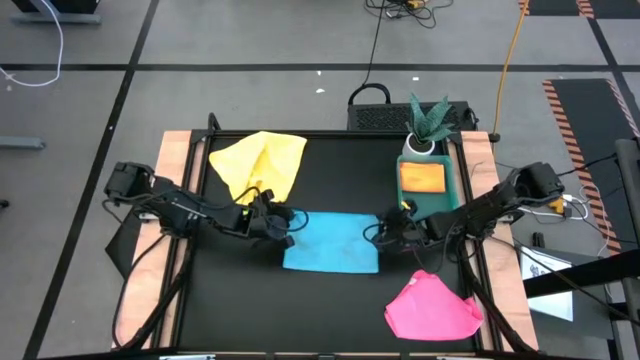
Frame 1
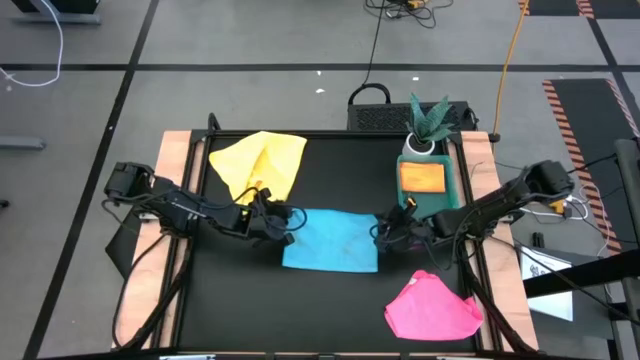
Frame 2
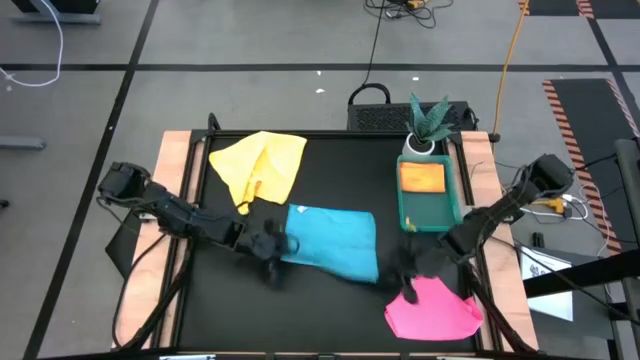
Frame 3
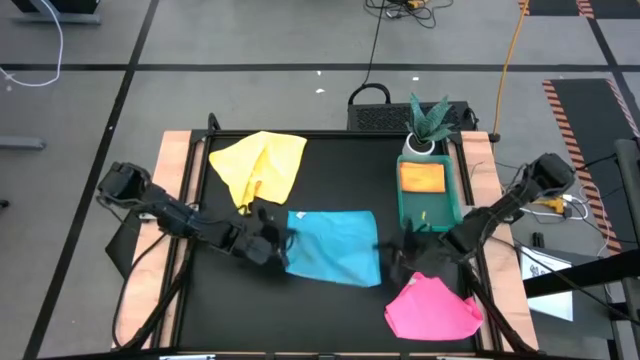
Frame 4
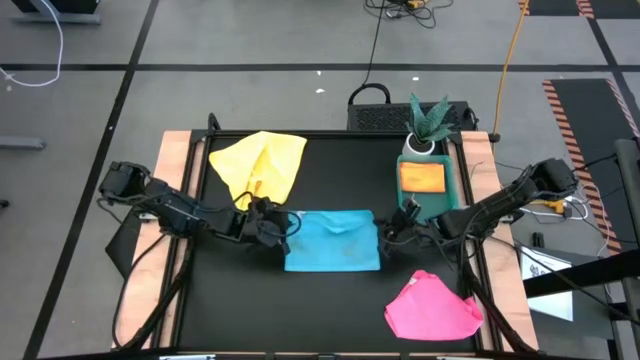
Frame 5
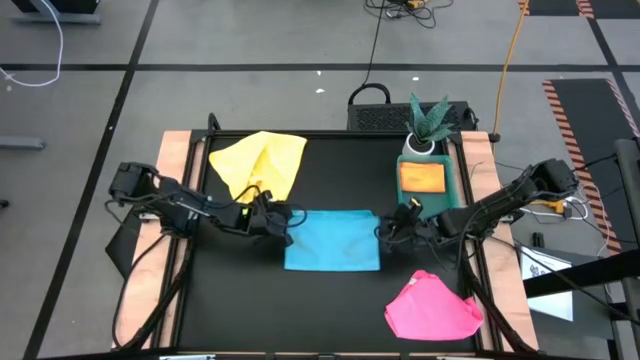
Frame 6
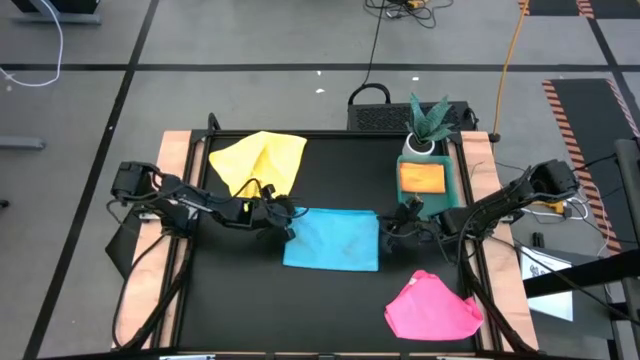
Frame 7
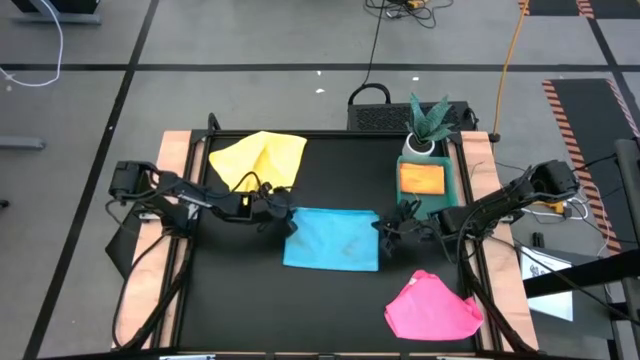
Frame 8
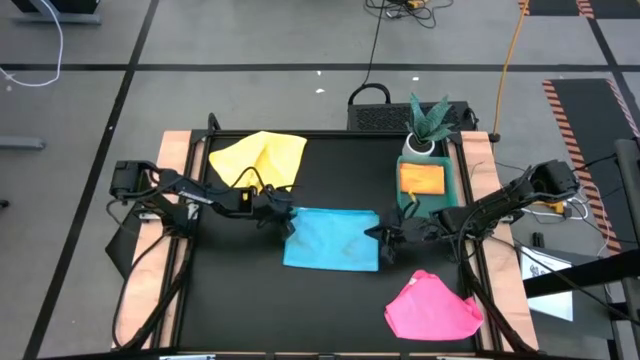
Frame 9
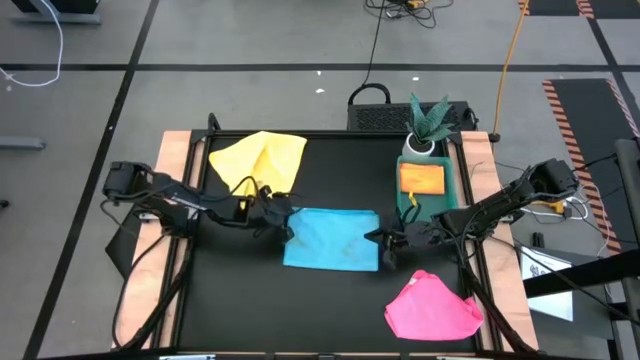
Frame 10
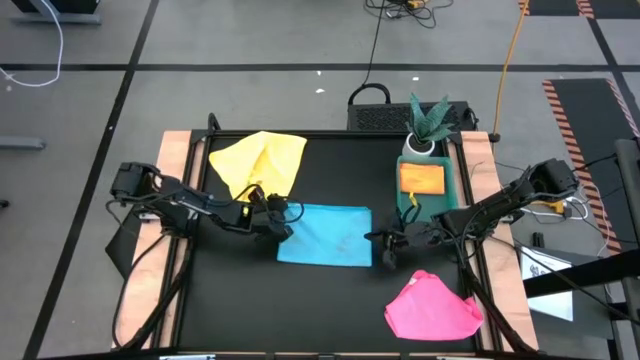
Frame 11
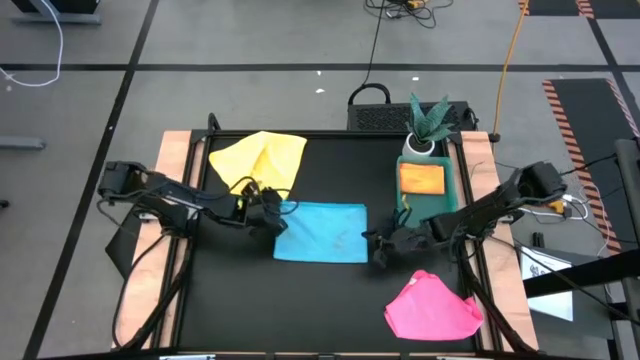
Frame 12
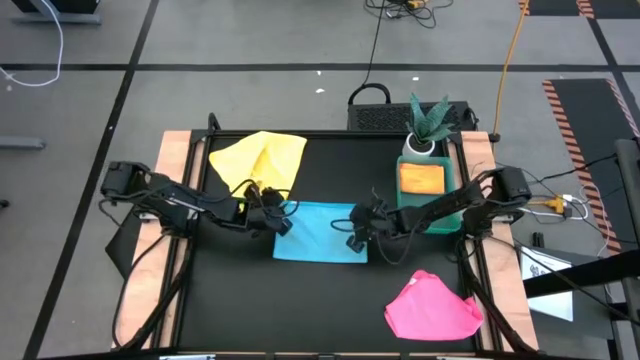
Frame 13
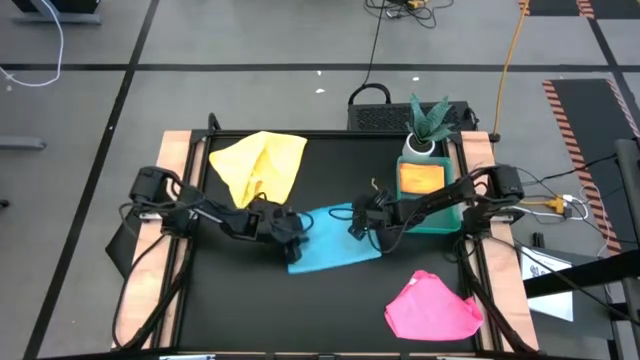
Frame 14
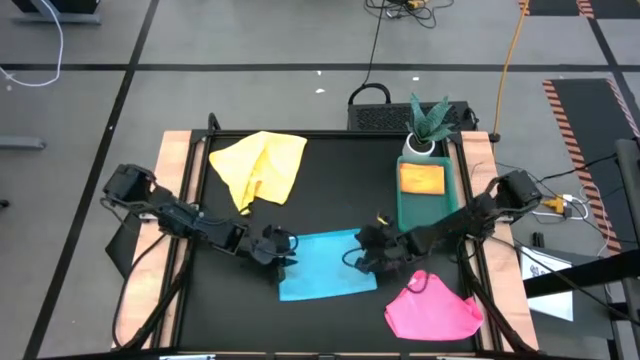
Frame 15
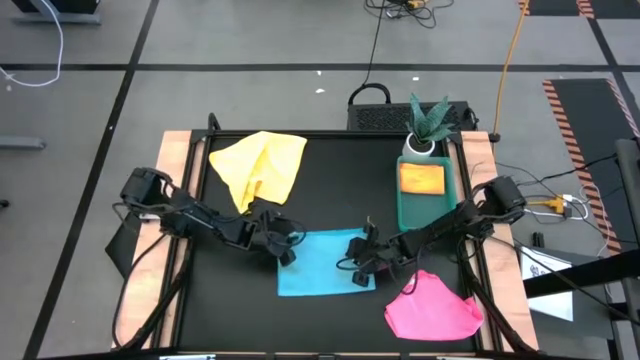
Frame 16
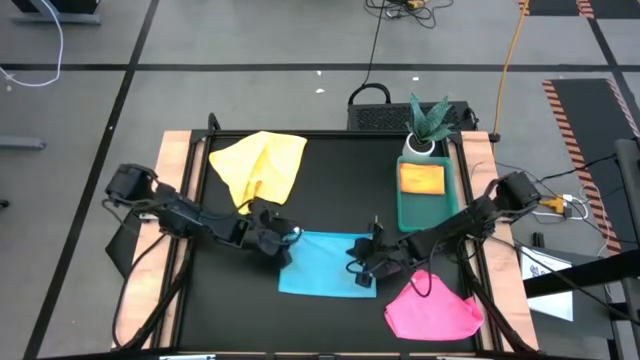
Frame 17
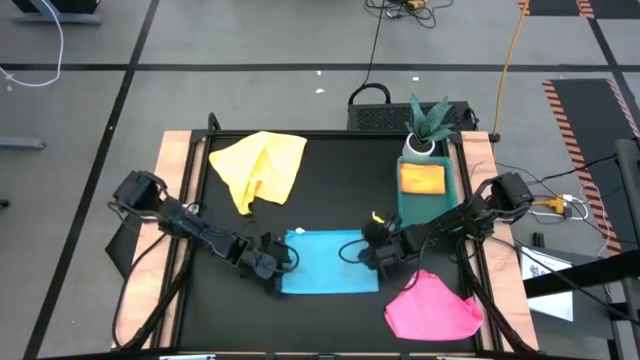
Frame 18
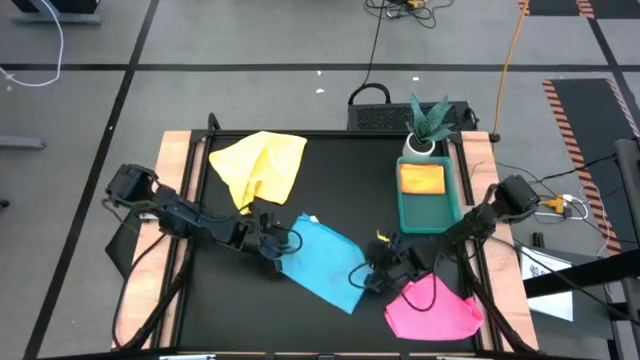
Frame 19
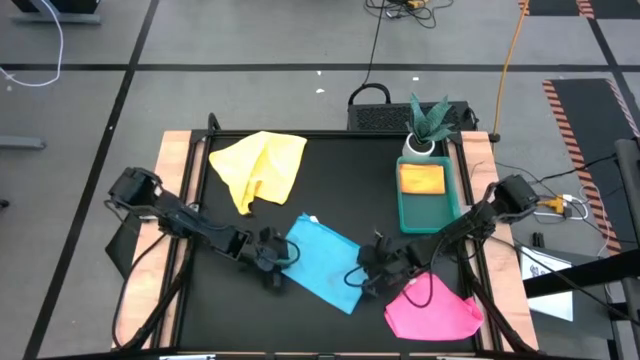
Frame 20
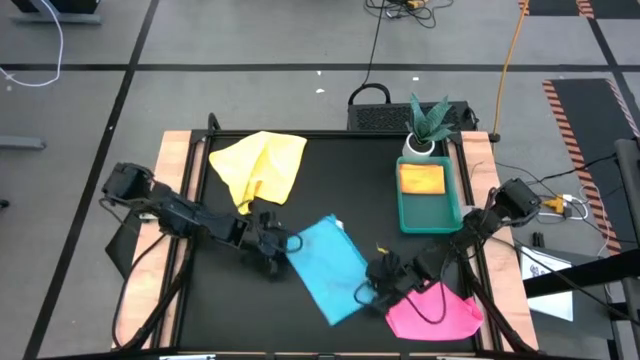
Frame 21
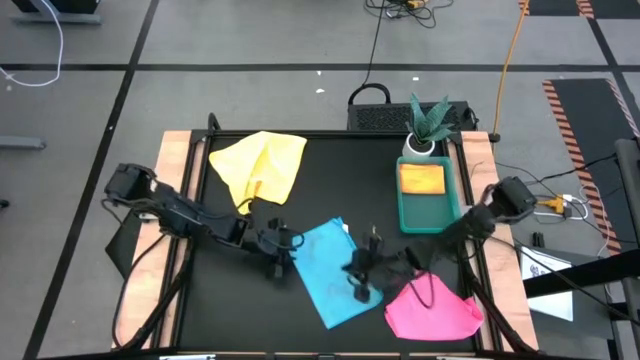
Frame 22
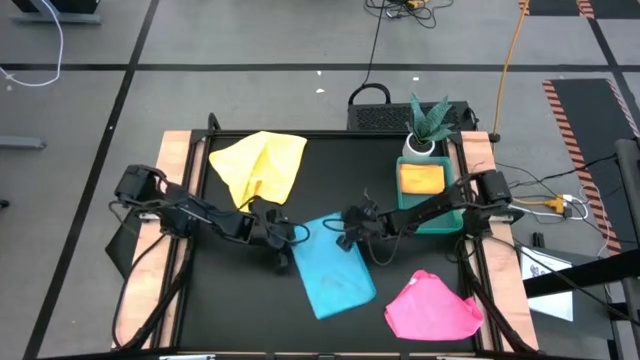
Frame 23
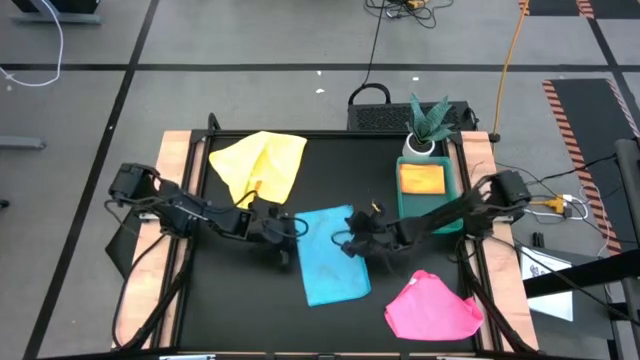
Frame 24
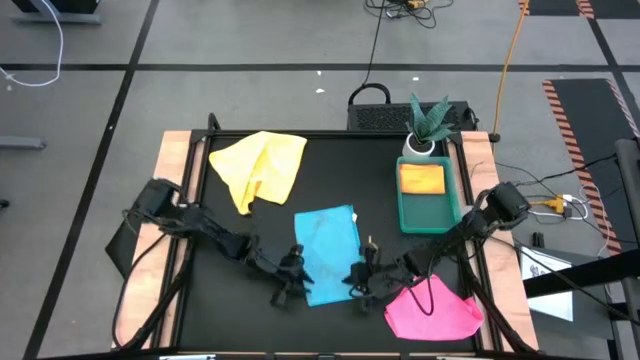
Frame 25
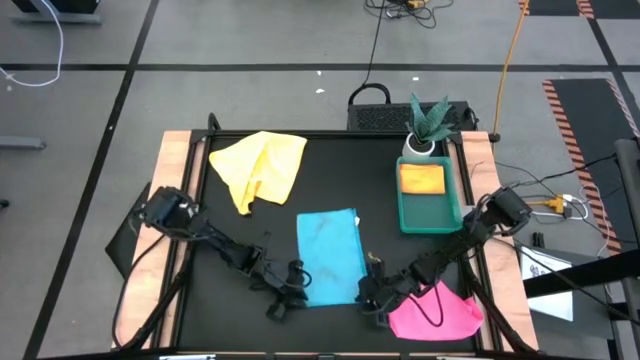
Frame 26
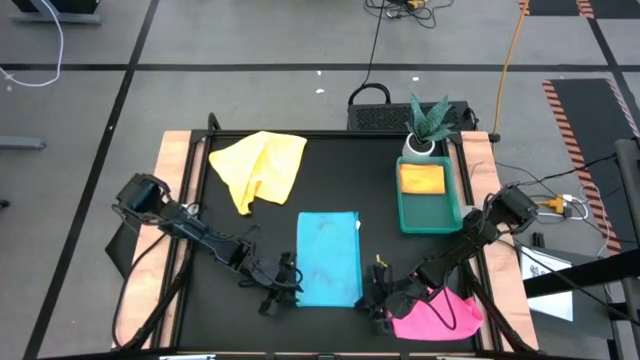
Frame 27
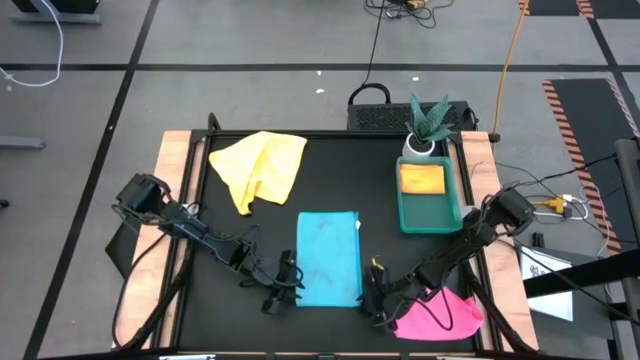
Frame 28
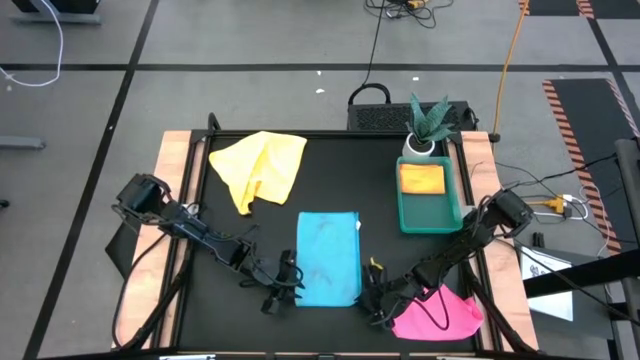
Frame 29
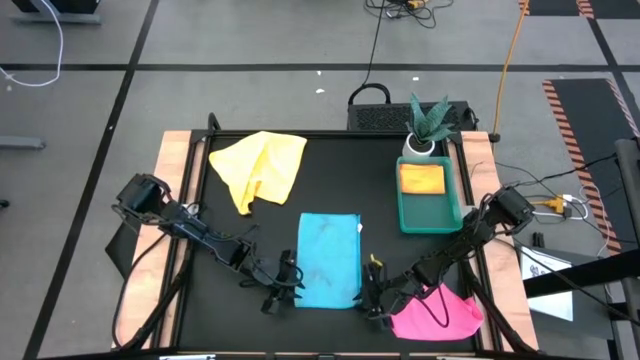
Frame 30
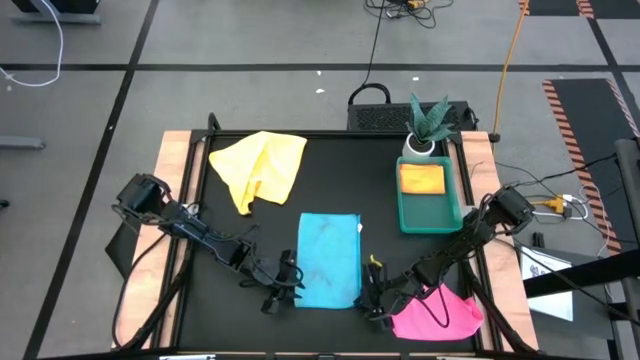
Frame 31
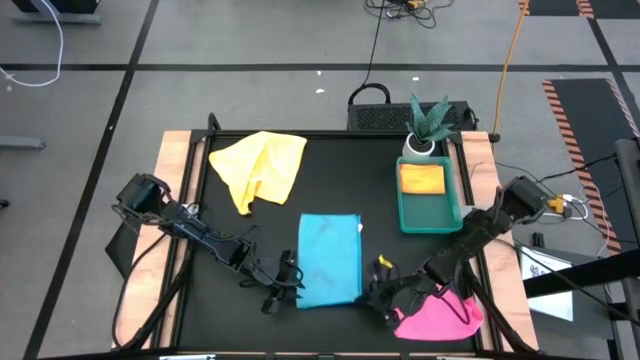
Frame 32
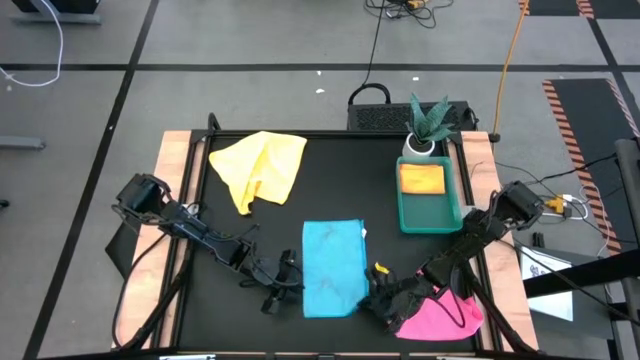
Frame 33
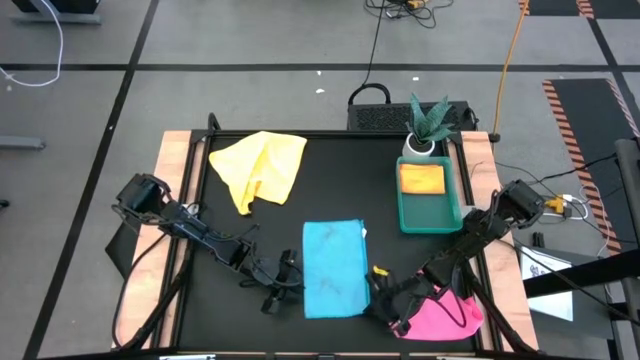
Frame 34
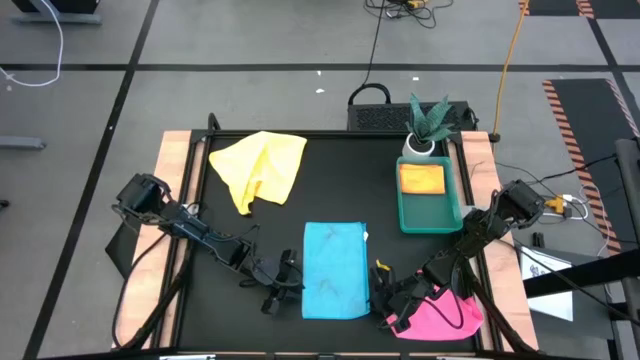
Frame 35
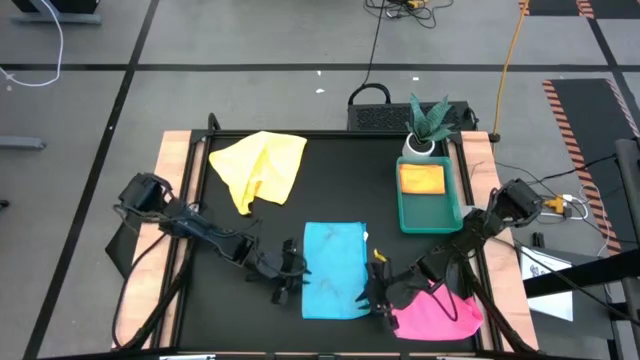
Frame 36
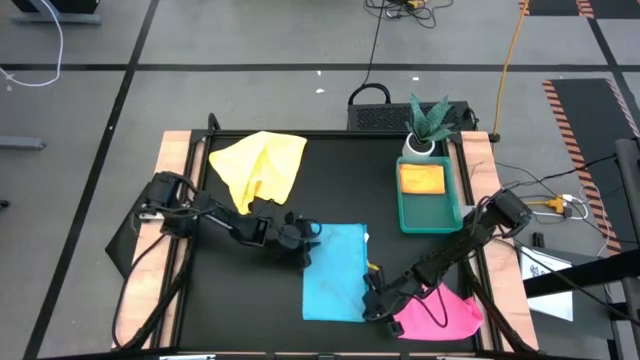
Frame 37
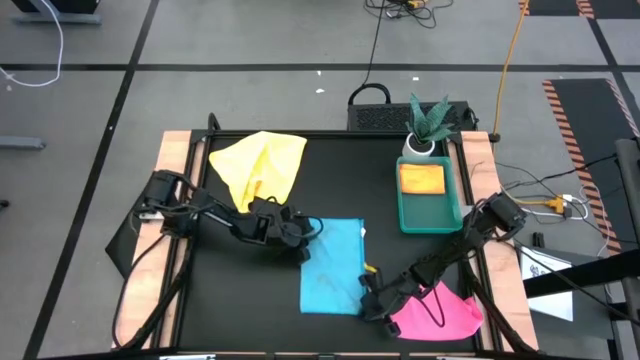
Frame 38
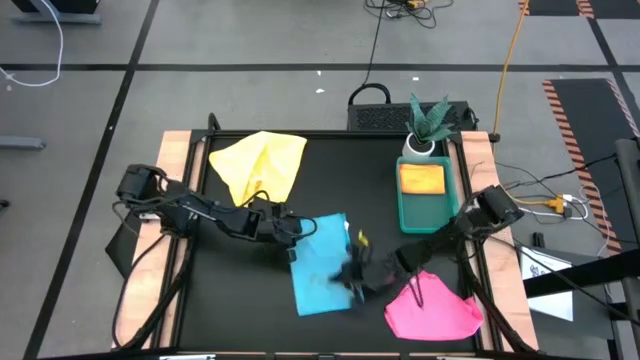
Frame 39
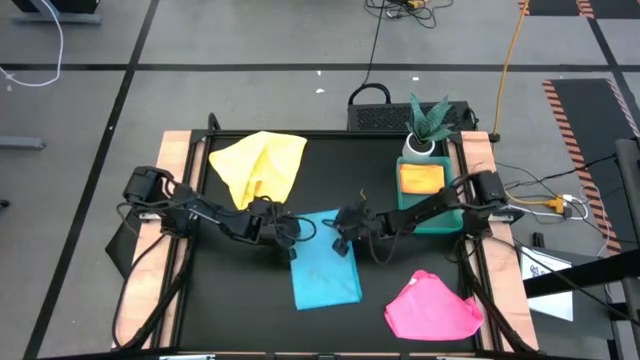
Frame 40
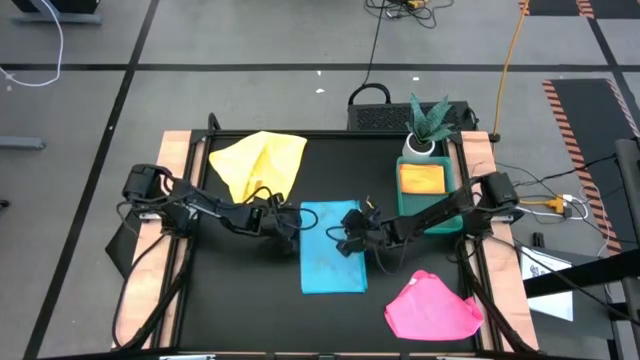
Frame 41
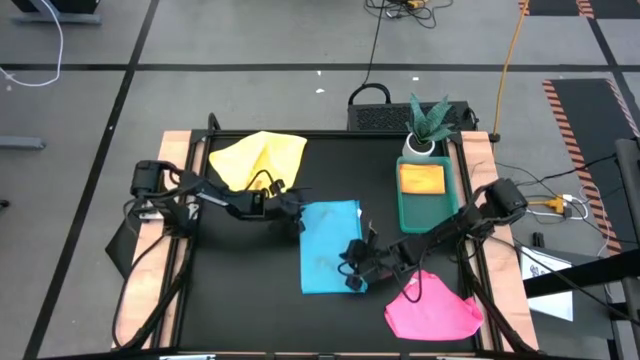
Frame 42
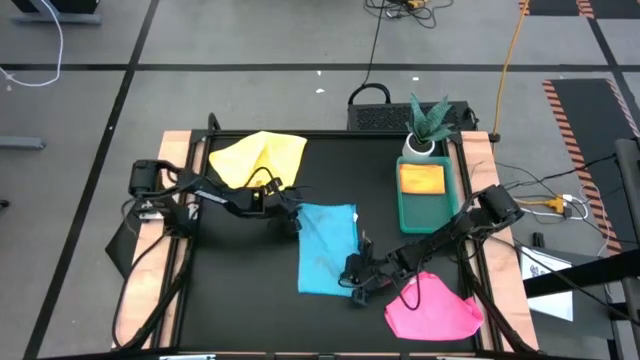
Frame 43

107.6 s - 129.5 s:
Task: Fold microfiber towels
Fold the blue microfiber cloth
